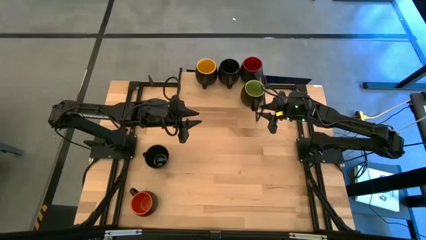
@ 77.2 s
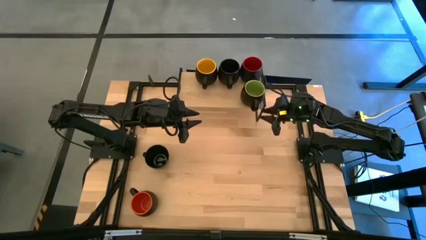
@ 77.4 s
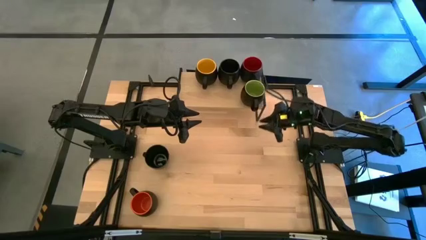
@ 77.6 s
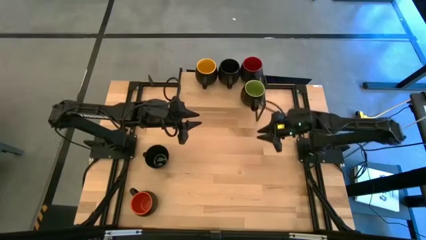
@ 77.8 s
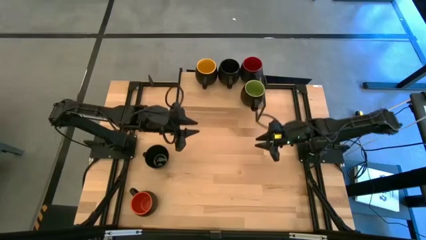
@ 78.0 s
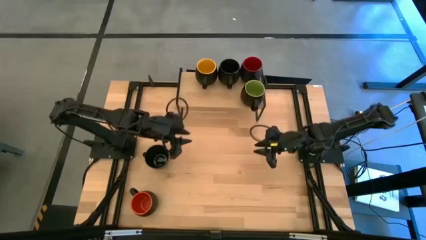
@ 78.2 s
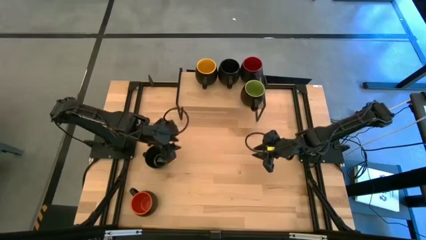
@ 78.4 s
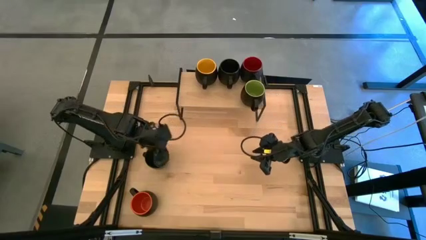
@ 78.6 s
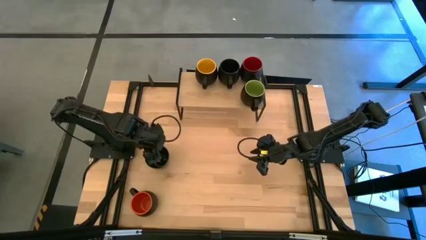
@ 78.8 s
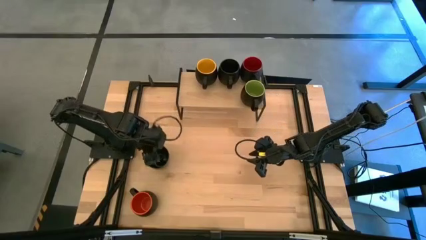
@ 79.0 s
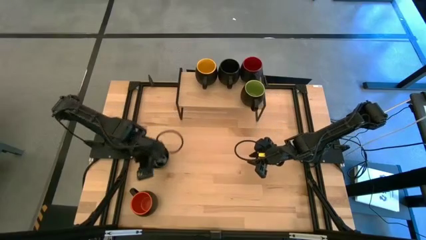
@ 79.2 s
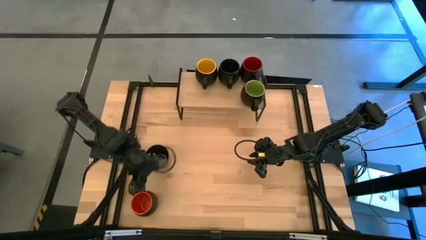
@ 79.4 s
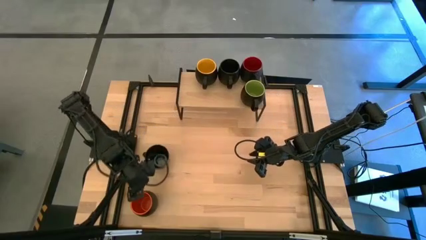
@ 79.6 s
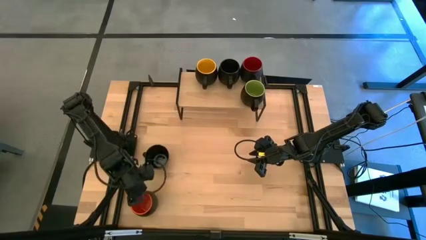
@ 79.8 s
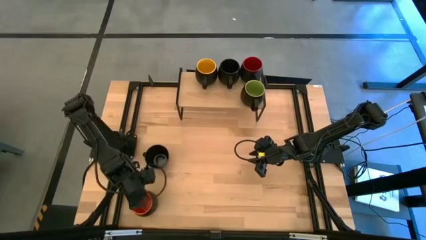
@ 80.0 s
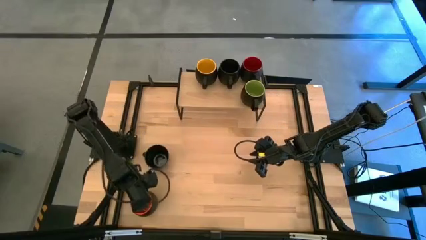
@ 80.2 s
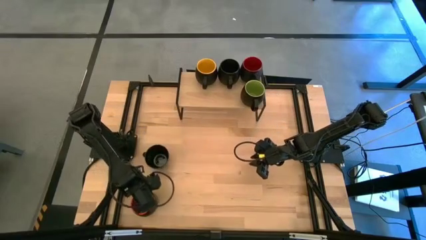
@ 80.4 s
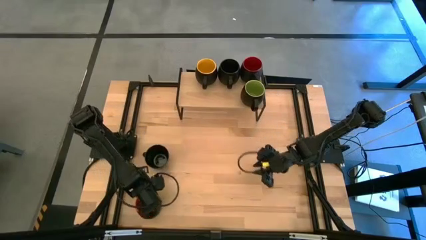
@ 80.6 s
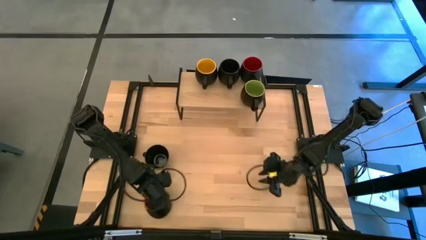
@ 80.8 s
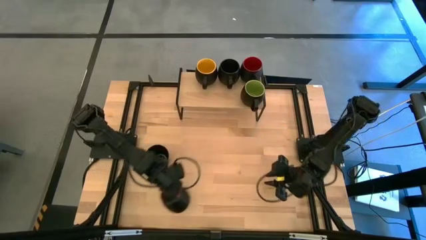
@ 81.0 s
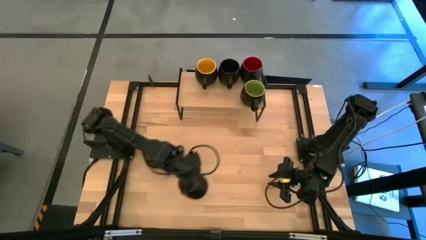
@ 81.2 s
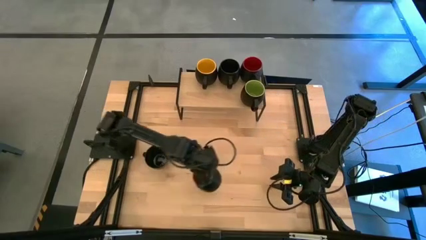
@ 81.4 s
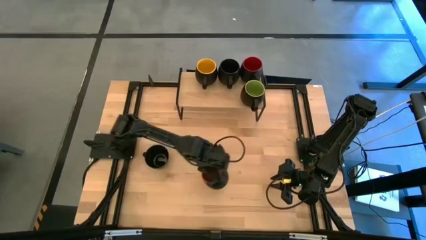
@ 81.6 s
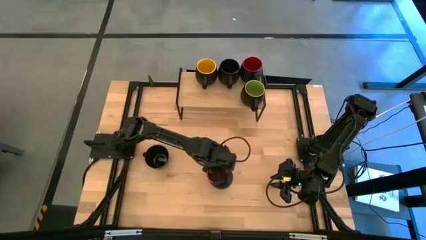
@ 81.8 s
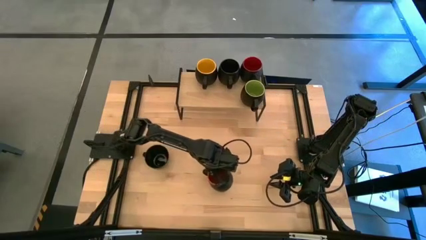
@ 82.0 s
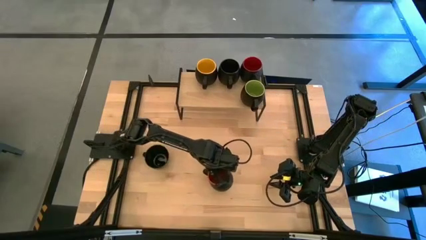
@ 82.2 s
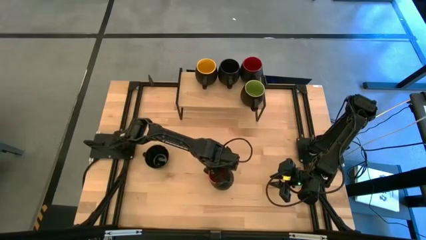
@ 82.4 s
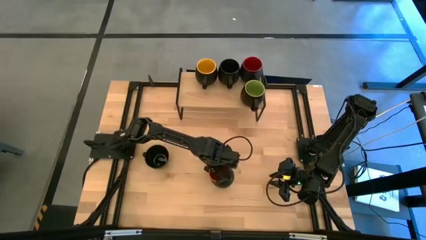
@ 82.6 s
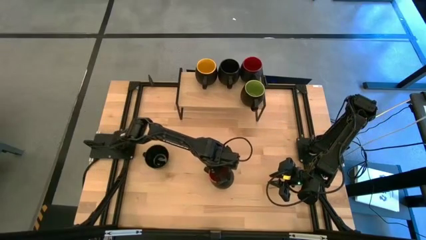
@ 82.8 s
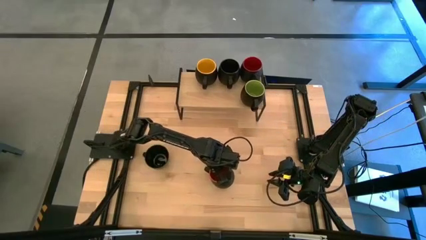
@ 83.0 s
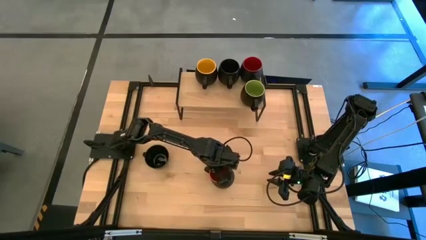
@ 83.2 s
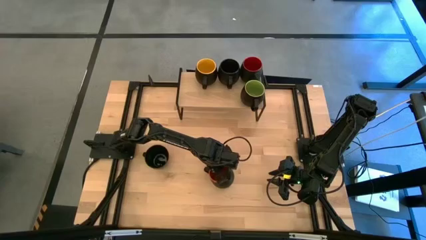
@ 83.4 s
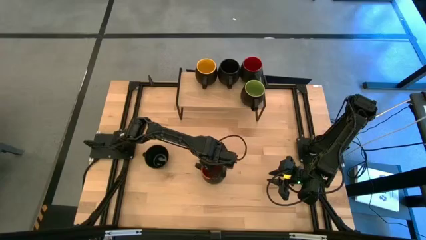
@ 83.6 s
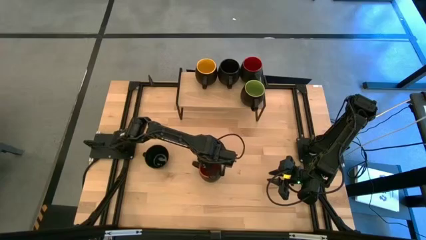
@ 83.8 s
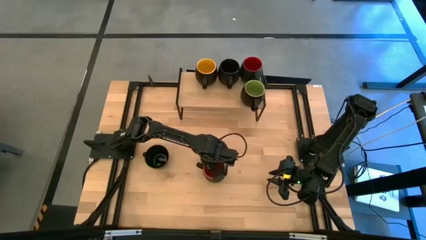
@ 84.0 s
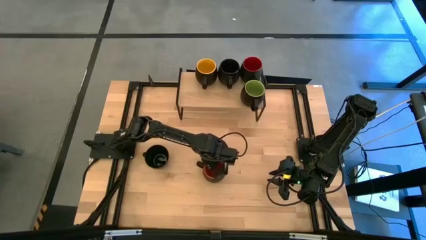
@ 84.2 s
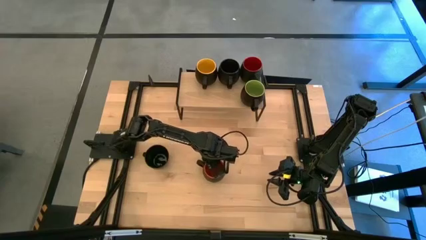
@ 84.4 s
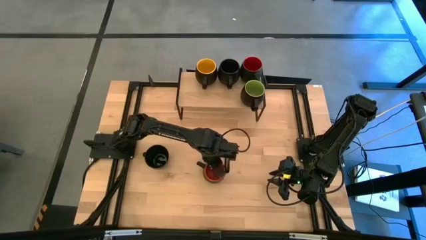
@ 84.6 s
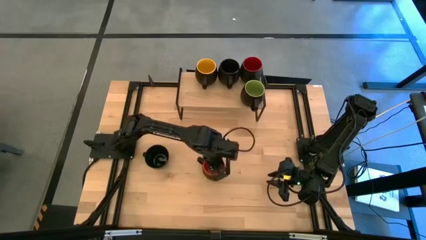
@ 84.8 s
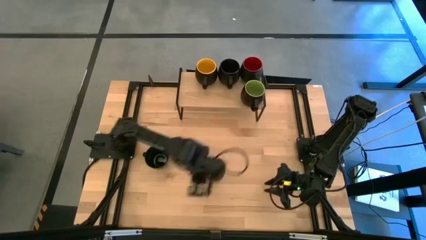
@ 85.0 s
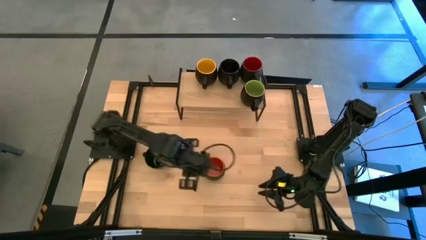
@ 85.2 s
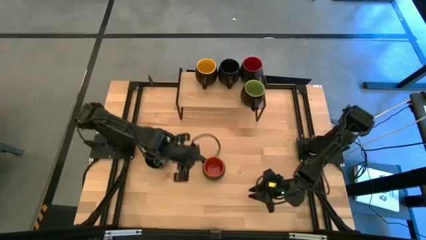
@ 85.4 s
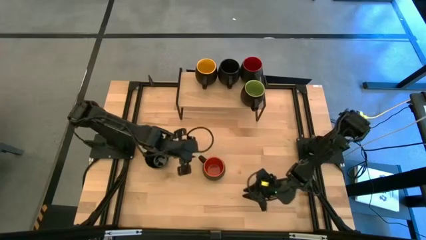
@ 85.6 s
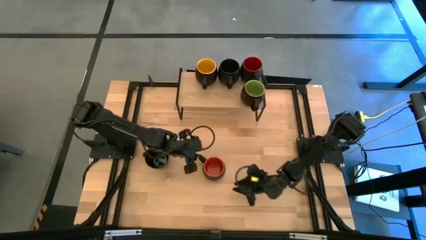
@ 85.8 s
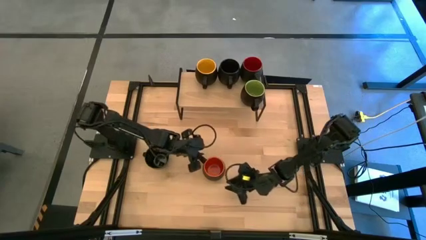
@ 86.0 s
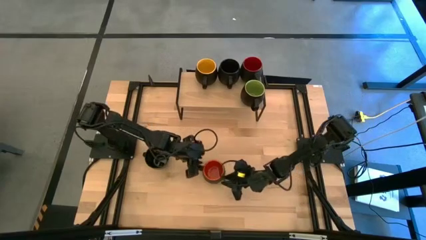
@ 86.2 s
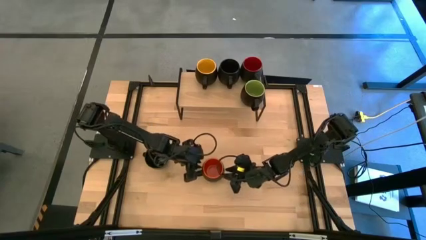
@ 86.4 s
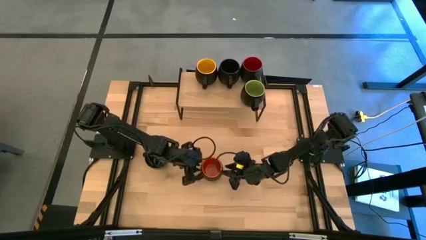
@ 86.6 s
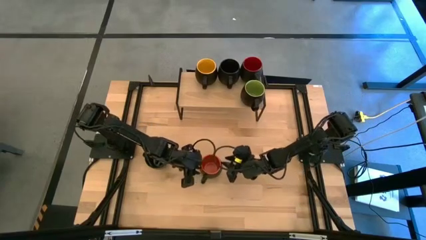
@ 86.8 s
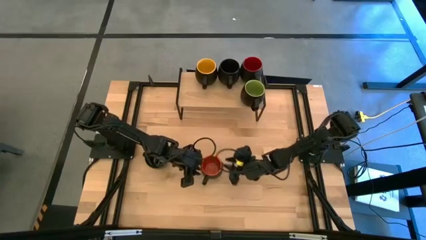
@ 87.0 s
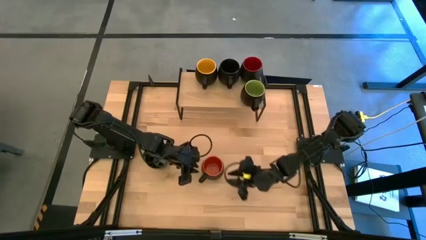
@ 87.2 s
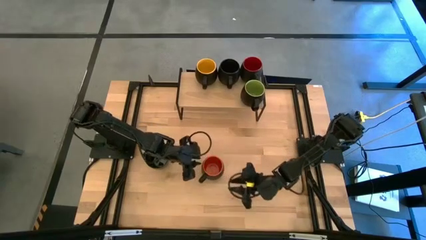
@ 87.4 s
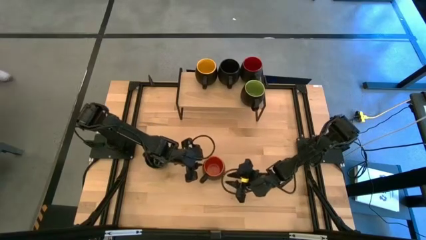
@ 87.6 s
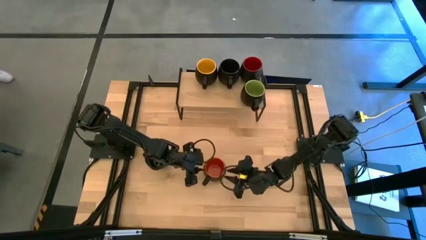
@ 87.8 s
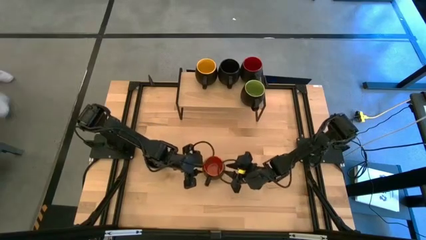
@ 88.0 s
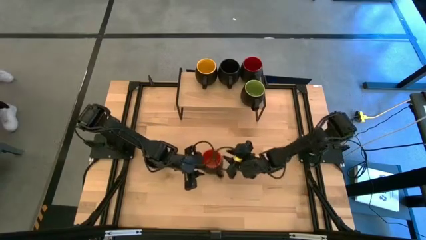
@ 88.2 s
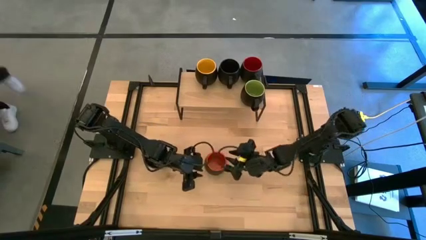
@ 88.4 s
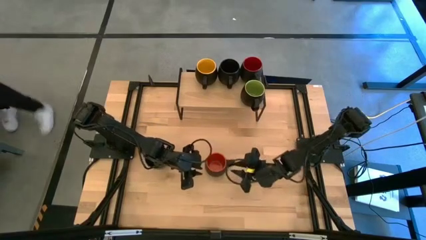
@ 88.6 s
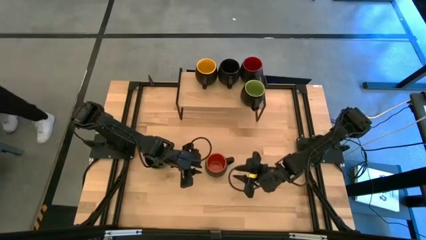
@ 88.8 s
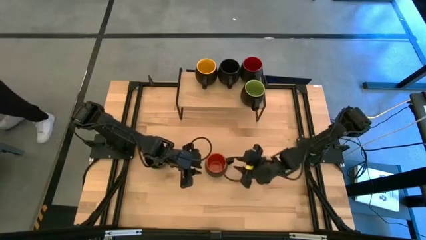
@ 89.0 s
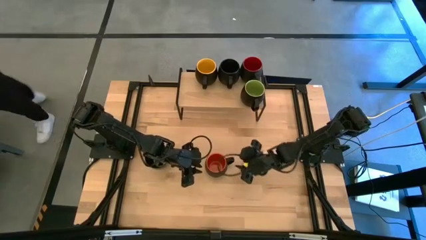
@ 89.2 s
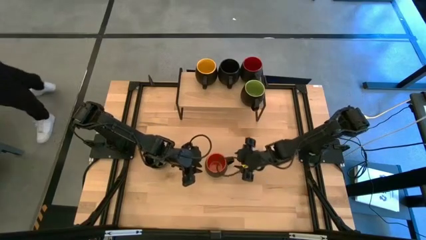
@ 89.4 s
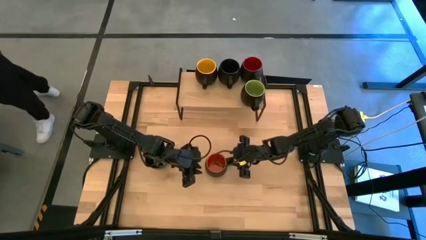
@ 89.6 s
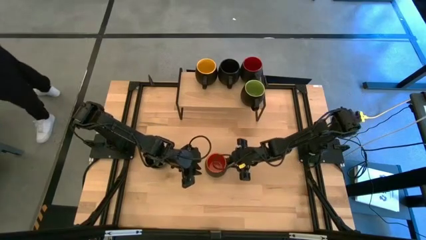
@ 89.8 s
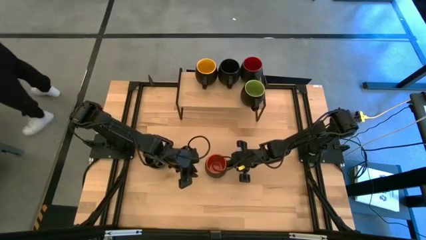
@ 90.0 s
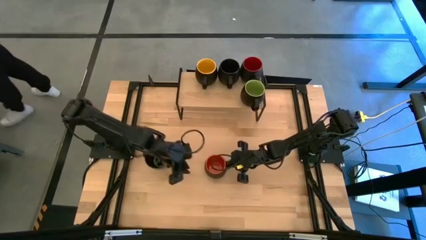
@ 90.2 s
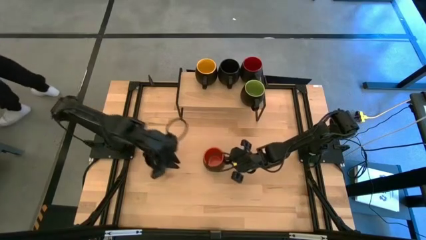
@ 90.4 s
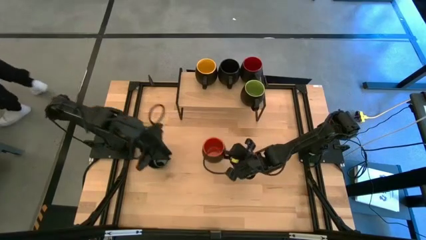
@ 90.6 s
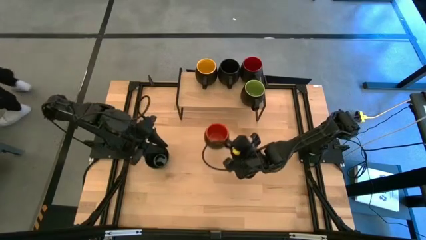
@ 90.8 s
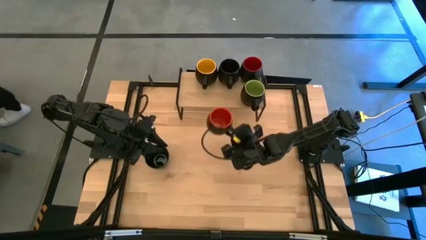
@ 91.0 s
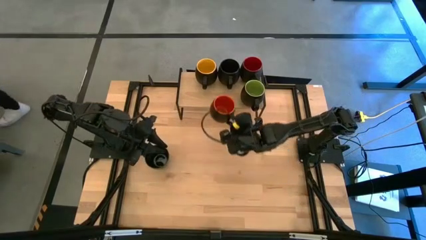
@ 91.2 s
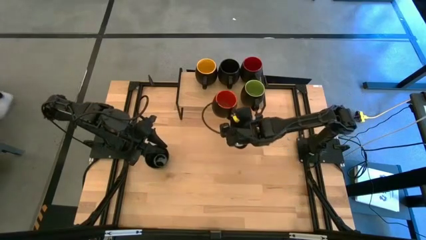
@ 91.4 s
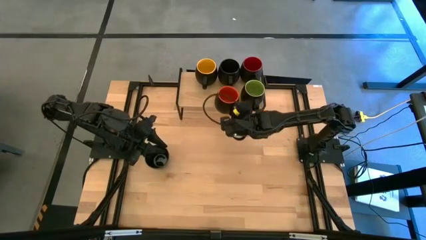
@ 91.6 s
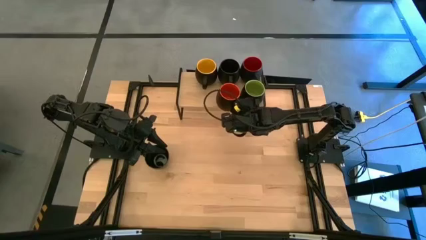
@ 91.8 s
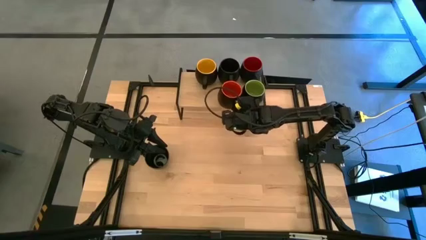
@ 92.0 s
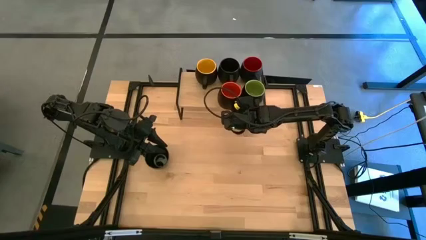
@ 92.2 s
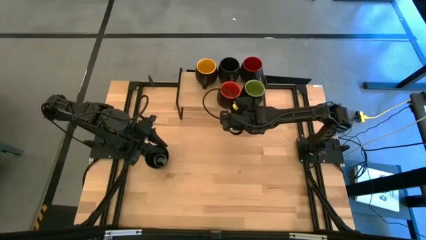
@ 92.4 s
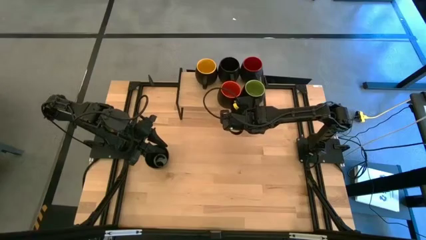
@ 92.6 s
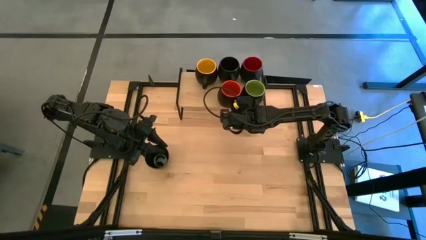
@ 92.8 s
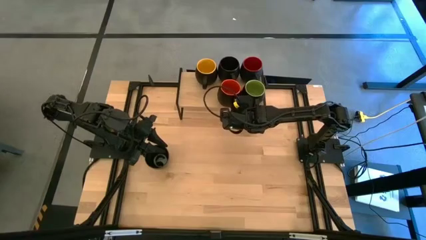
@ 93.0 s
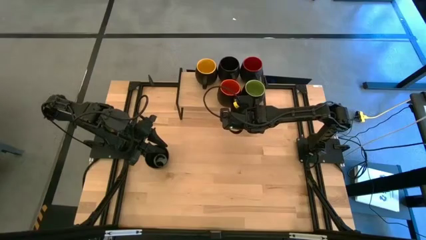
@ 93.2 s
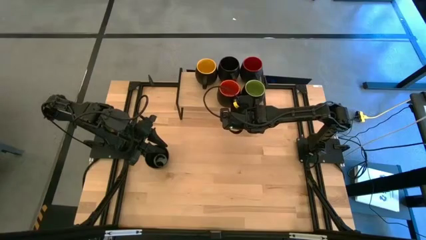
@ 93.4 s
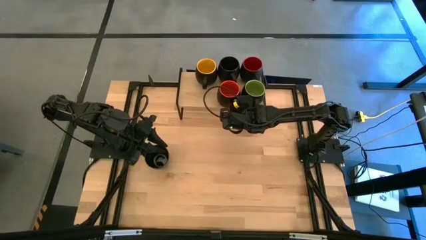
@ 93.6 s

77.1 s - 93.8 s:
Task: Place coffee mugs
Put the orange mug on the shelf
